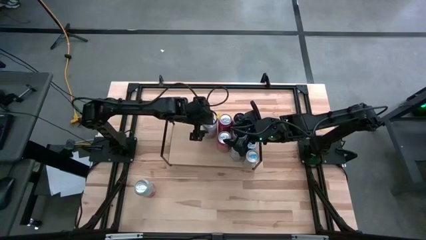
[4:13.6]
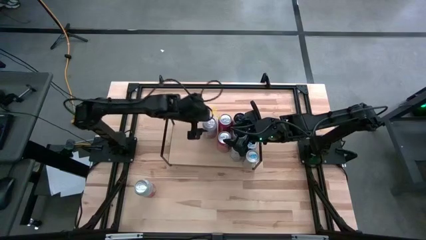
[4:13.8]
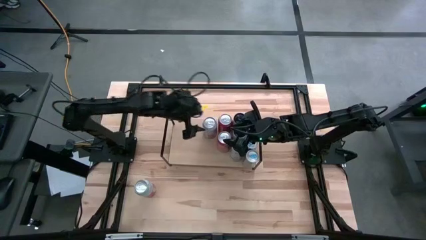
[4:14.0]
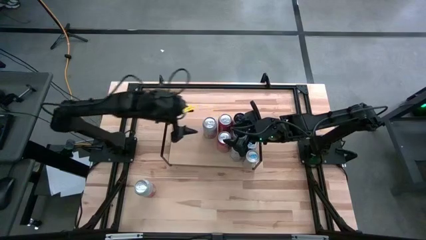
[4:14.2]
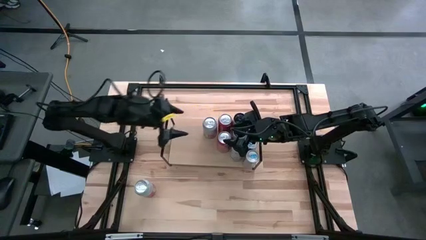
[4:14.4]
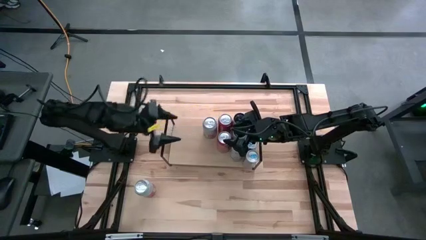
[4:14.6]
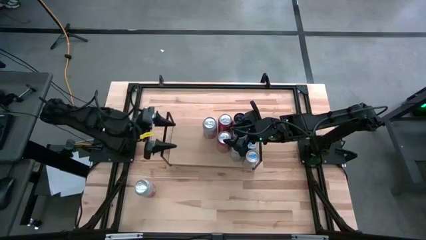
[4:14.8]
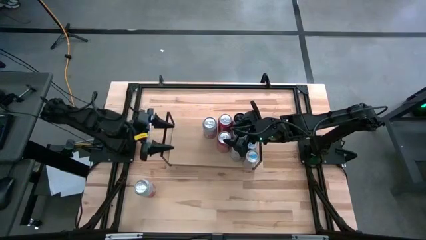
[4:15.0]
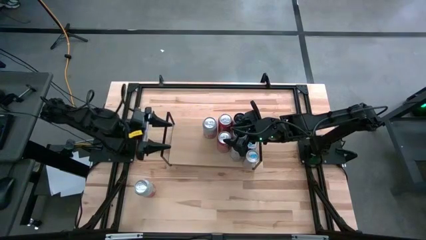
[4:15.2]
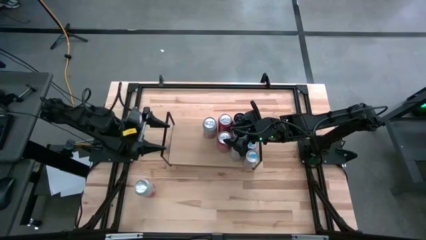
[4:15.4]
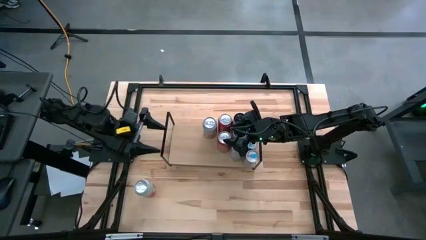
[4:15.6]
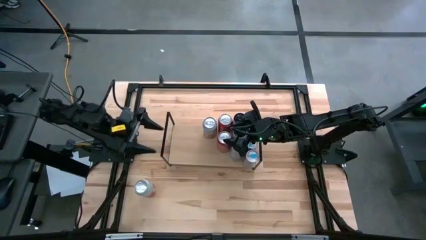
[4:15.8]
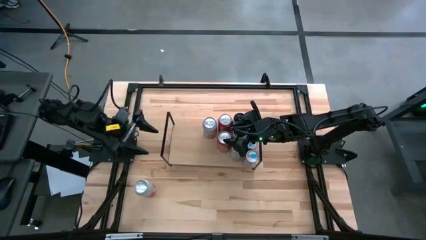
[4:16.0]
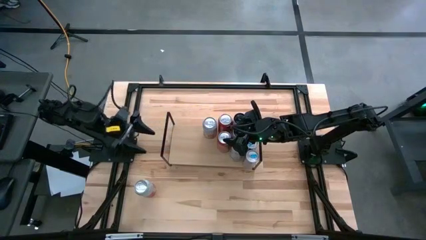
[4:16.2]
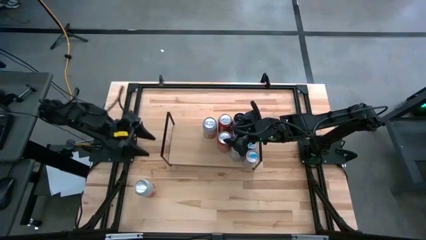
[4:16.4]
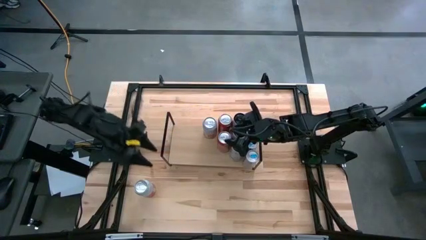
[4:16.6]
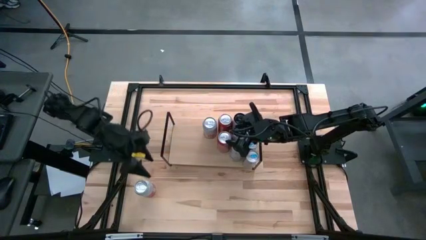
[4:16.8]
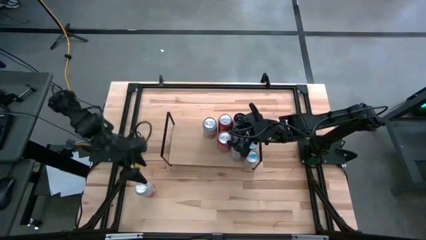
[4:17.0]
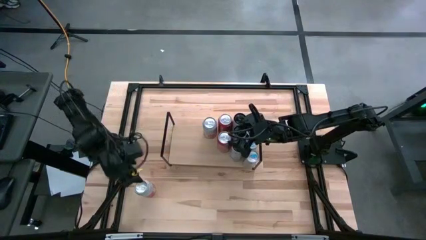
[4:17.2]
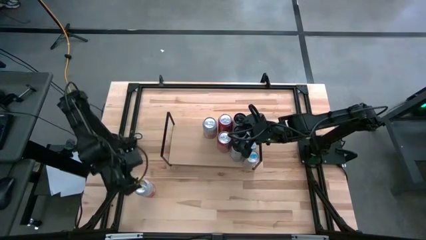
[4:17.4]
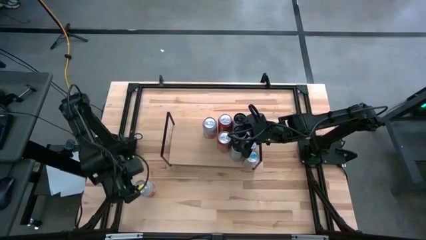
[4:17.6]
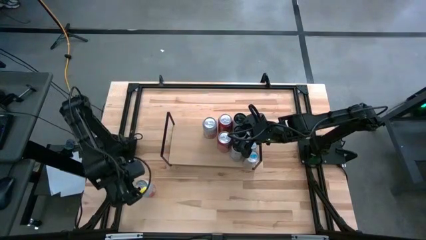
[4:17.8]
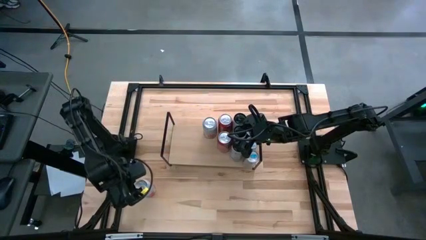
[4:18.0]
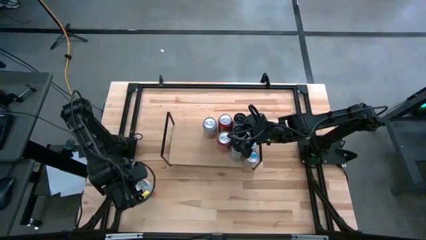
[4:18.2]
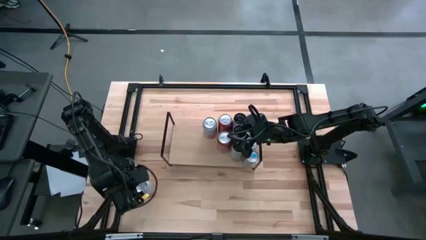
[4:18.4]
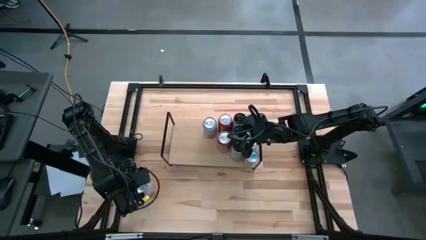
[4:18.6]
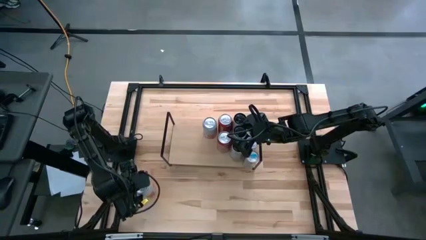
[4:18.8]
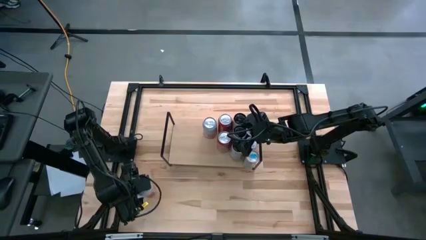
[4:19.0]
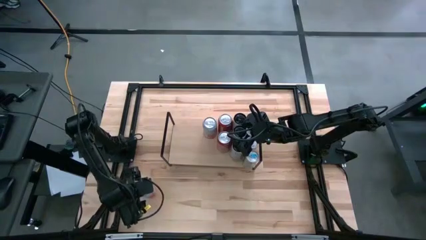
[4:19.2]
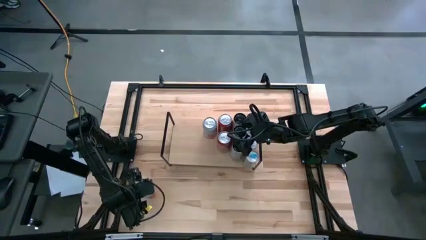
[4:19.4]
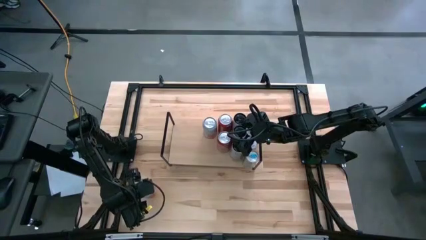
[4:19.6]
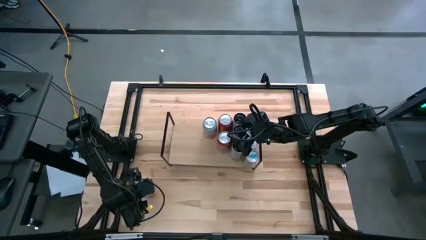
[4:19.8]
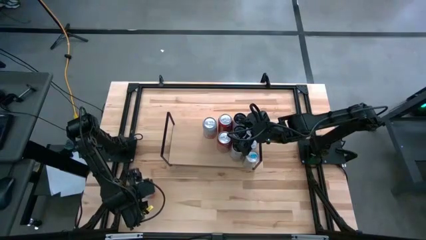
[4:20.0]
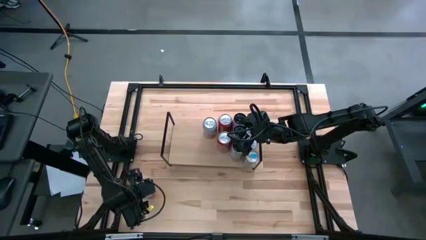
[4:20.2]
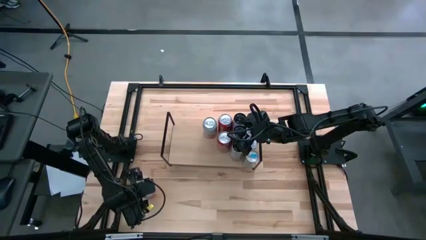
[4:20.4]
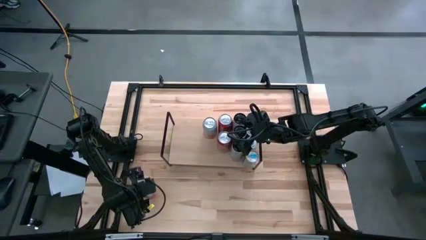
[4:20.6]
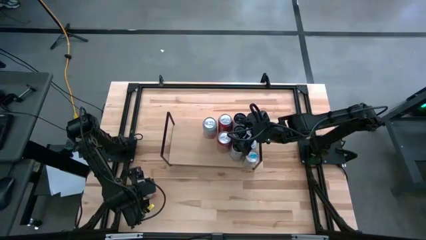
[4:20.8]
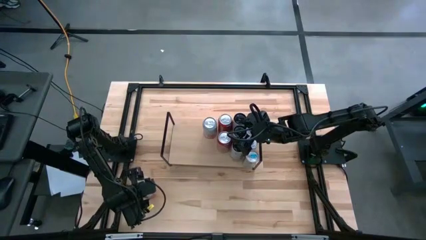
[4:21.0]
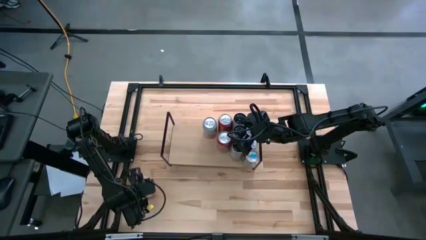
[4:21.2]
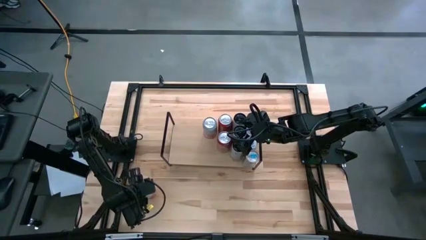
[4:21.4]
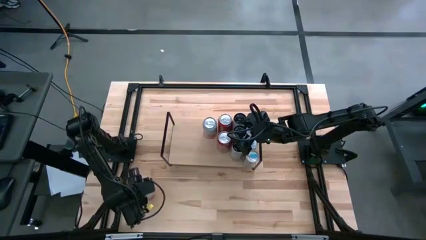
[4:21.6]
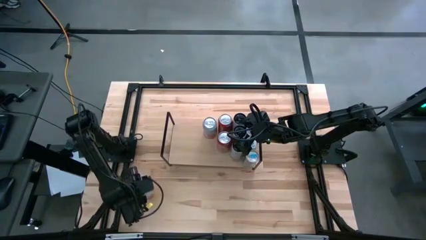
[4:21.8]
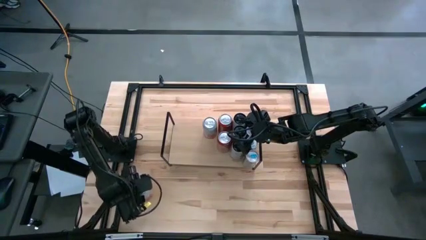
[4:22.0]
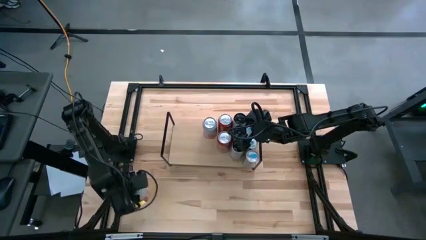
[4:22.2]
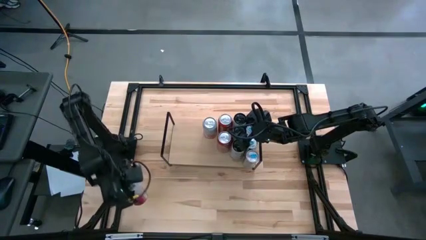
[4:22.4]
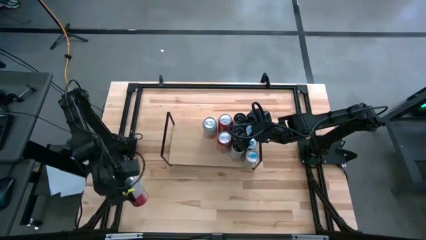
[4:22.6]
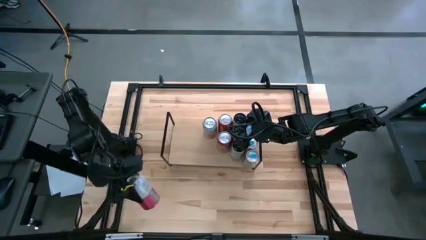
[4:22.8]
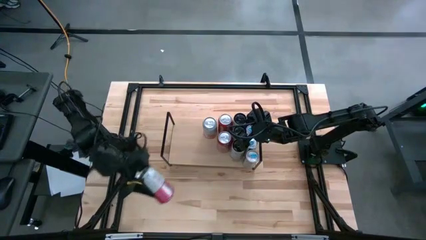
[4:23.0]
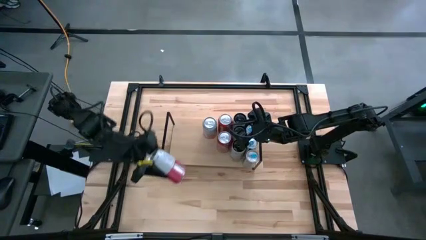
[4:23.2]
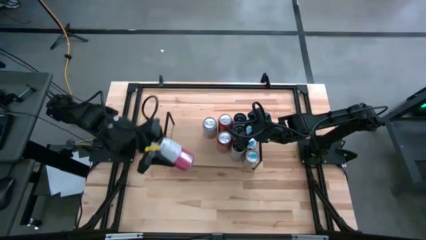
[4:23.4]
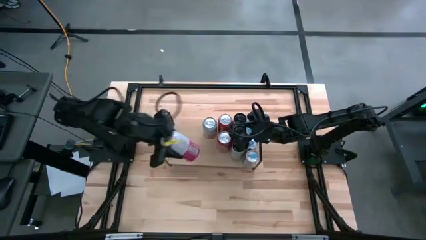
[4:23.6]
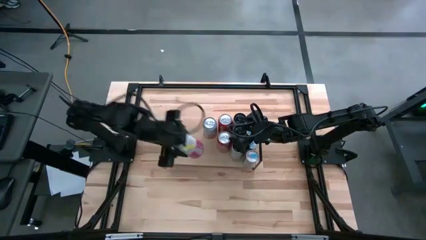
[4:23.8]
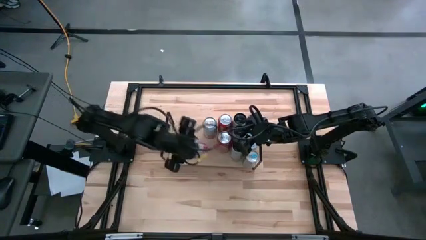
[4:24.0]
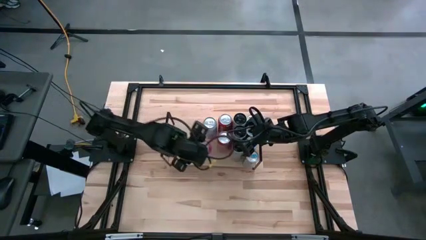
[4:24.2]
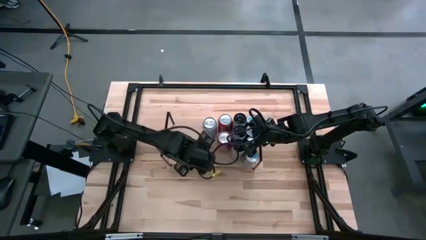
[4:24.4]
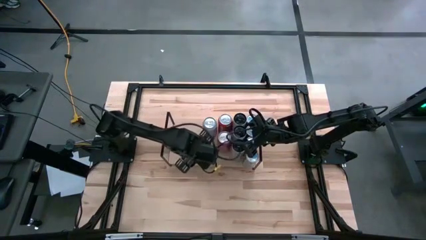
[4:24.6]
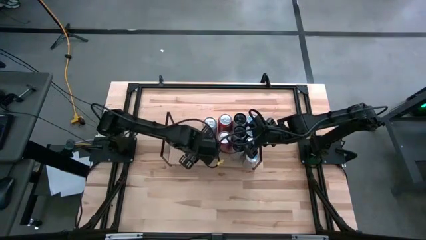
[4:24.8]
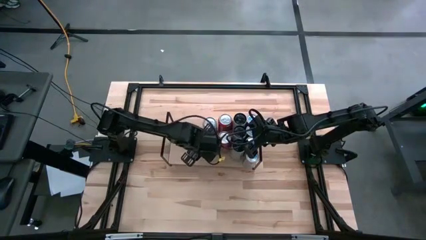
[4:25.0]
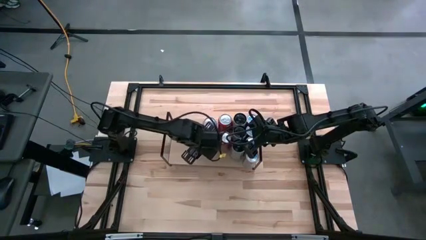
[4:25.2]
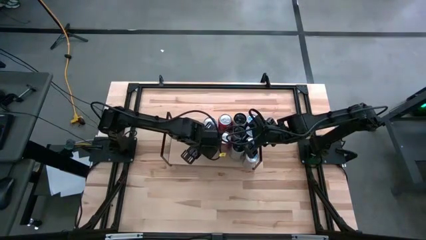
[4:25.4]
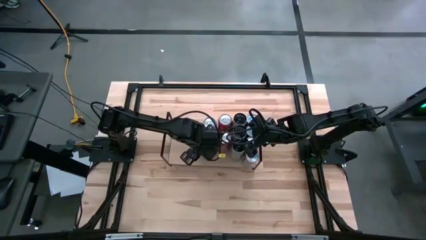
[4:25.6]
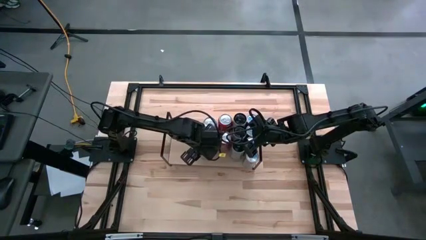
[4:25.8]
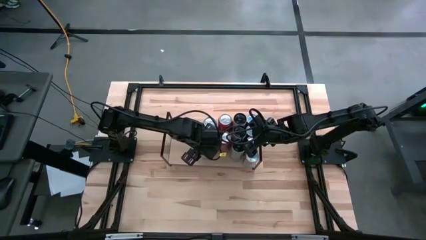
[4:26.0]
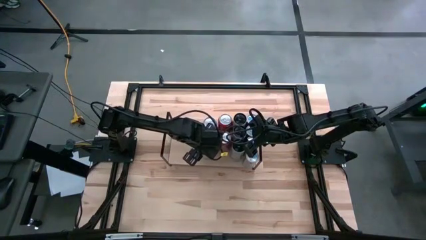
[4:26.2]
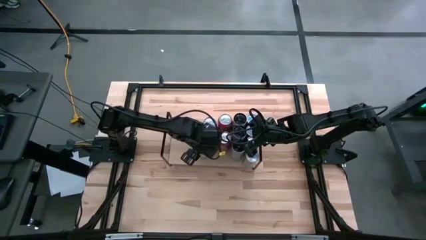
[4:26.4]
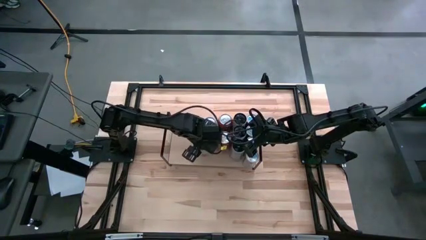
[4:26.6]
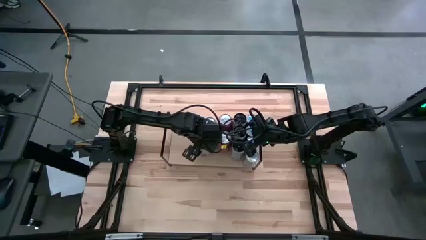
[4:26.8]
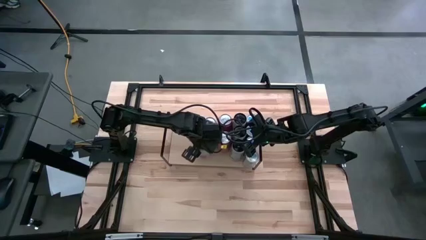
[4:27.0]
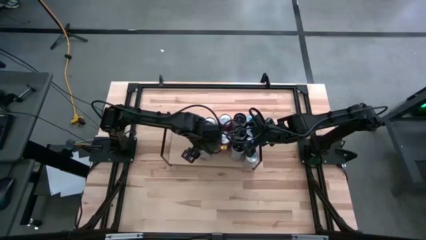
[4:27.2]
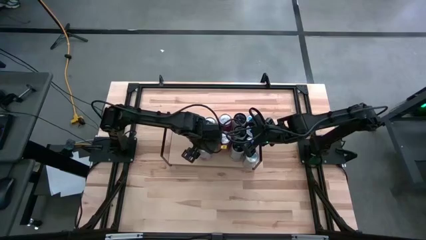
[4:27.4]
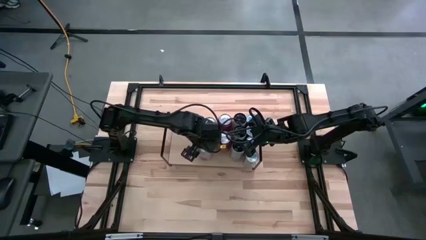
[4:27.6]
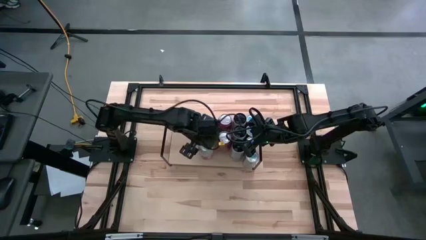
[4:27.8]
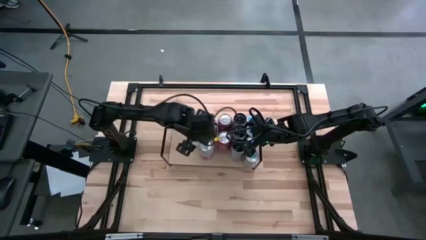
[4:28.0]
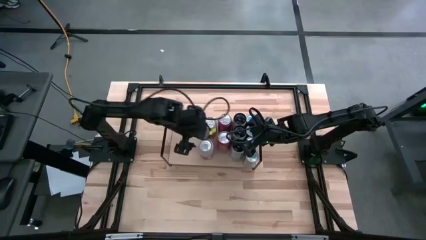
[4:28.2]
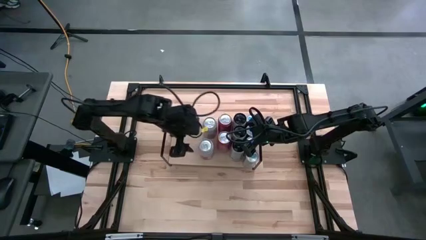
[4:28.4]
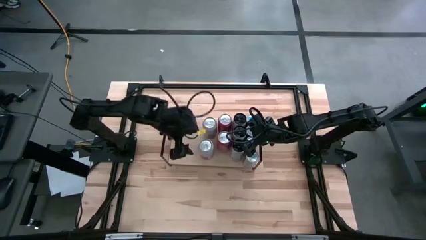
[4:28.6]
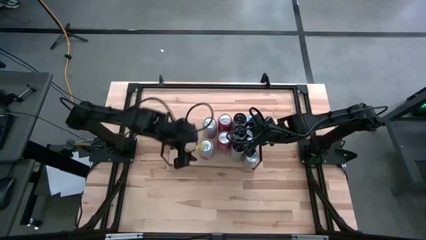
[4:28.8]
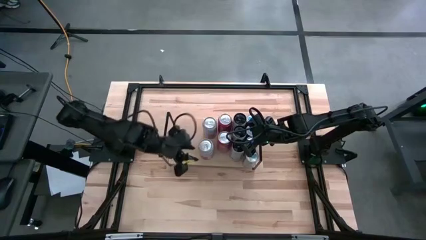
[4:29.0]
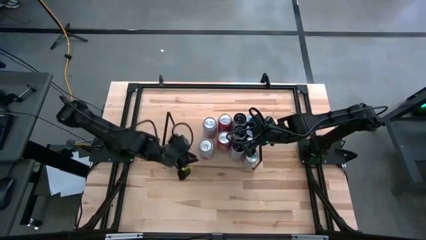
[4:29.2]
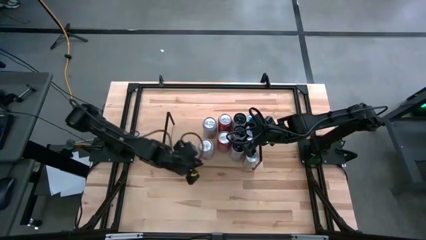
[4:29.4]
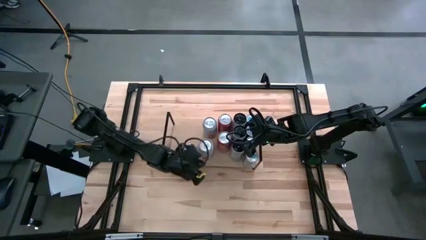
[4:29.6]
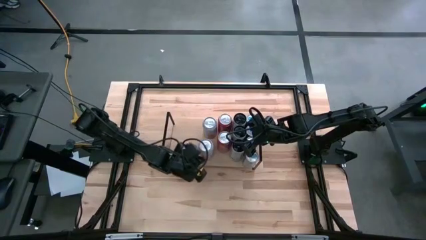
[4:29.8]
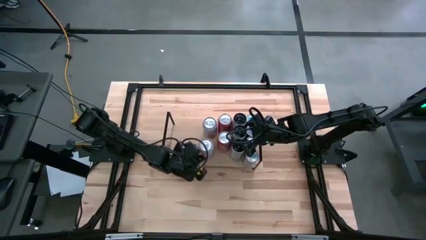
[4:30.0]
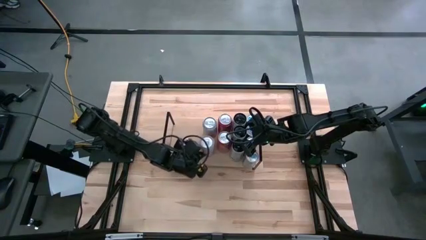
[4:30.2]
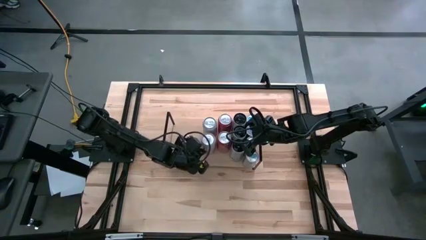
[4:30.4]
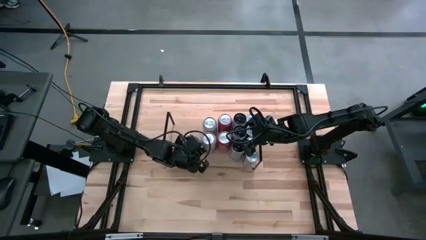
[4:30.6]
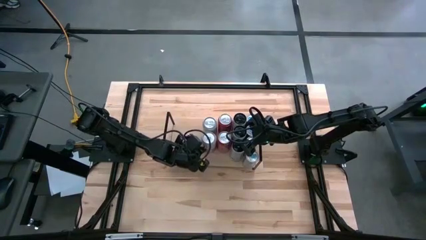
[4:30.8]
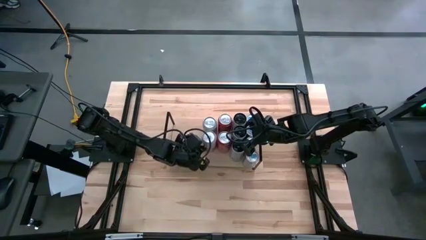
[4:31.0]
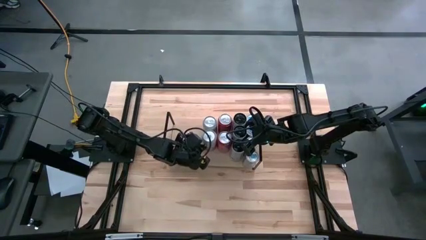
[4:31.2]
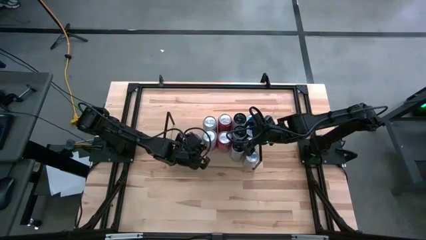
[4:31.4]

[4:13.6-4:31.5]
Task: Place canned beverage on shelf
Put the pink soda can aligned with the other pink soda can on the shelf
